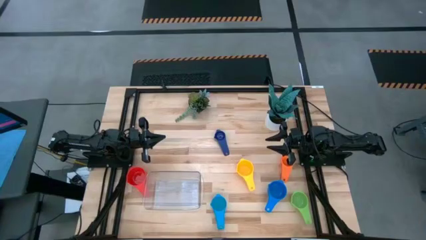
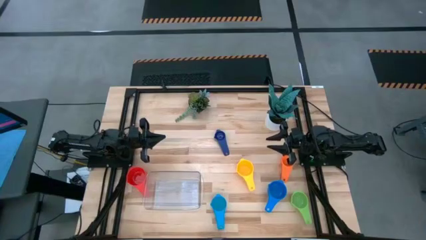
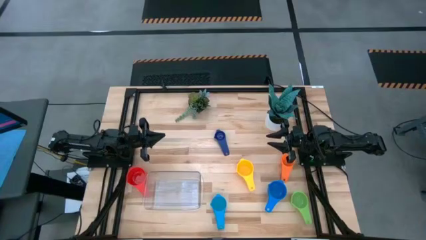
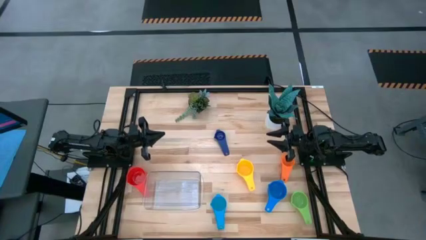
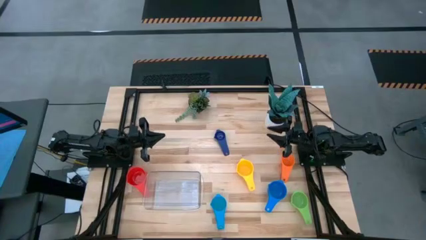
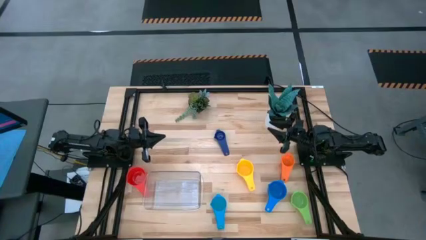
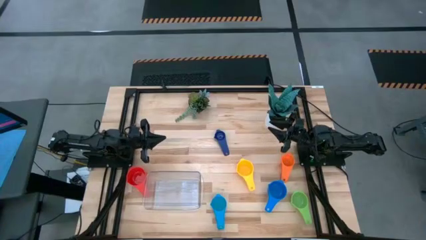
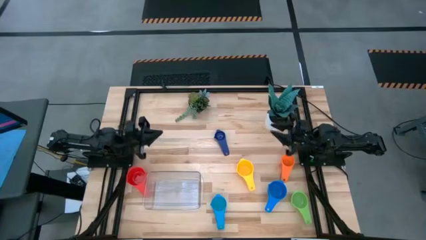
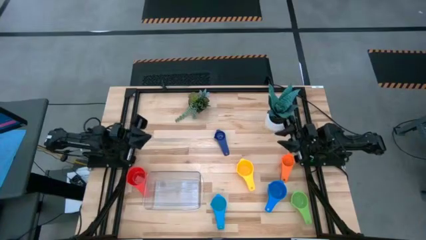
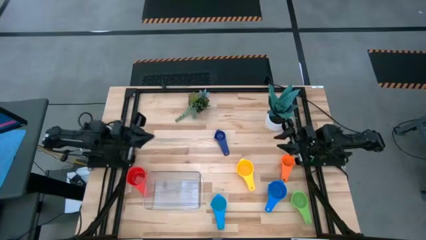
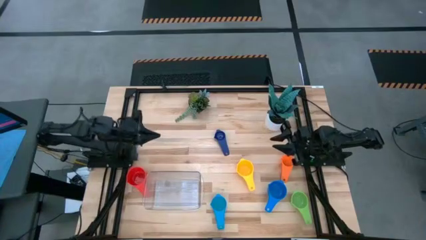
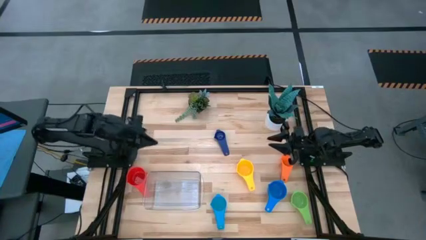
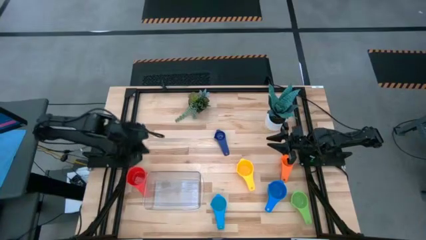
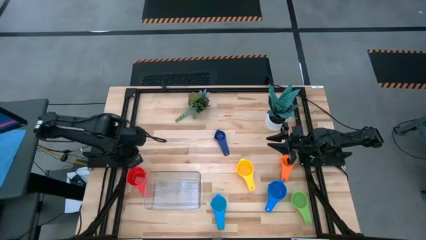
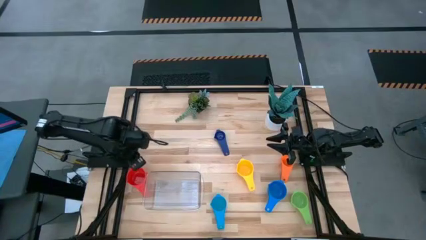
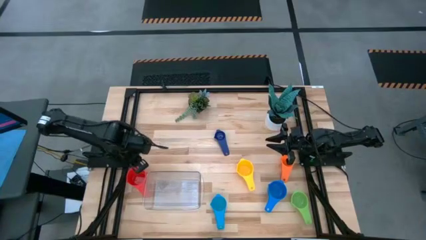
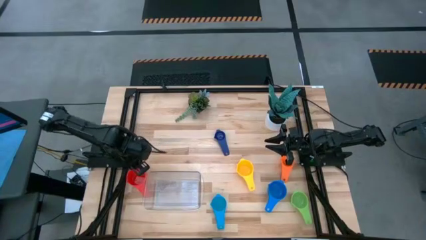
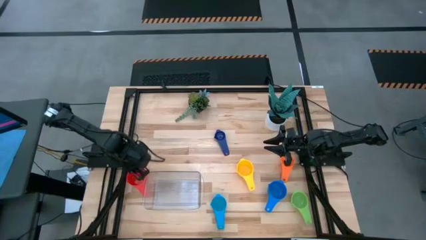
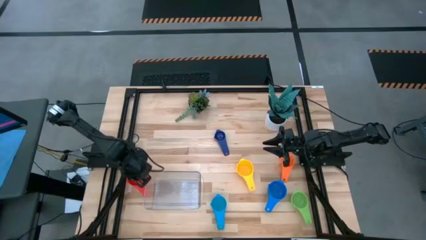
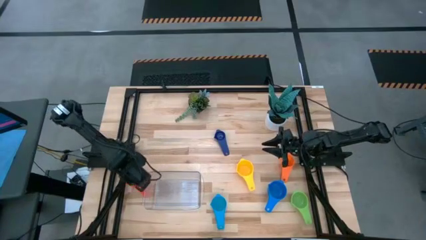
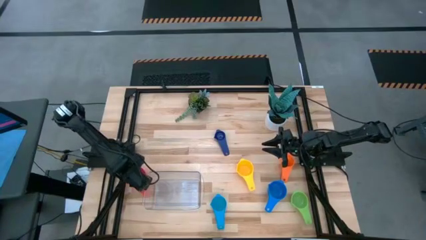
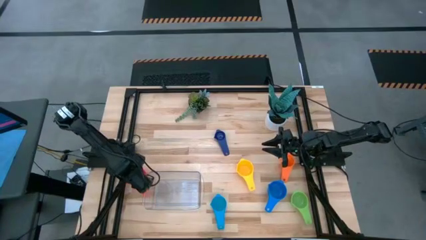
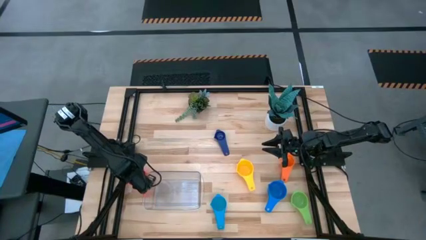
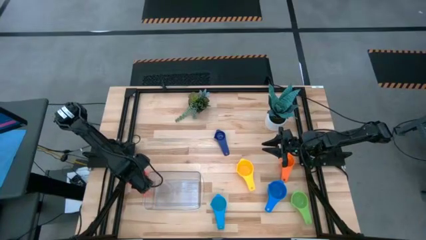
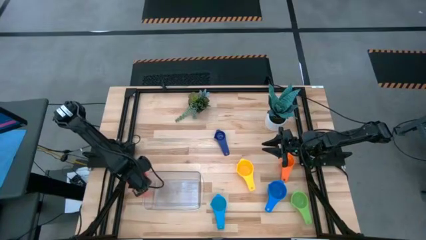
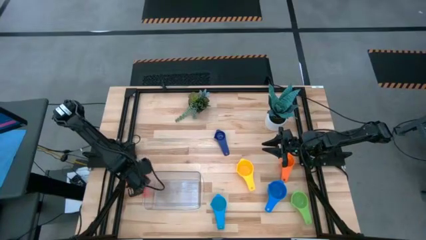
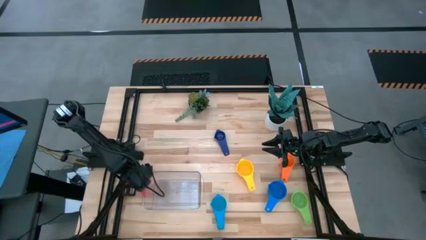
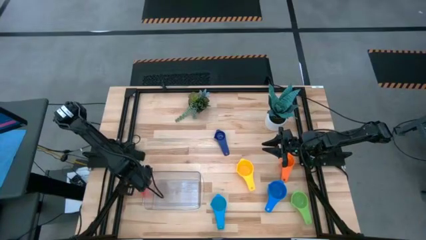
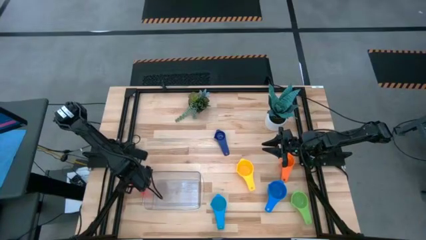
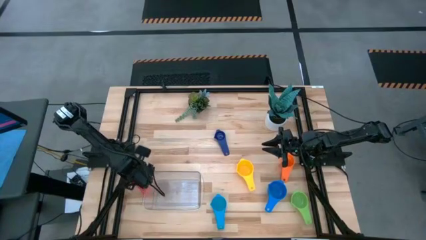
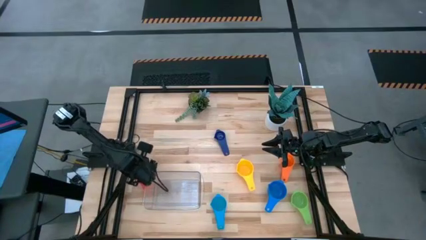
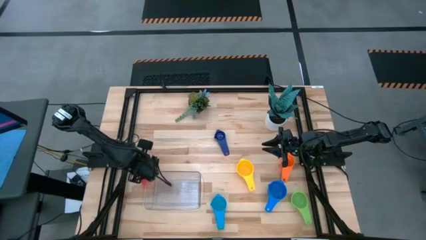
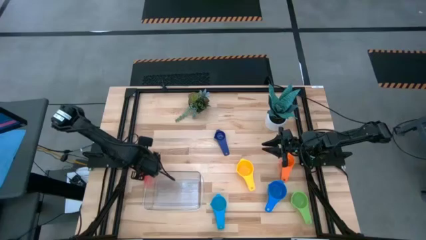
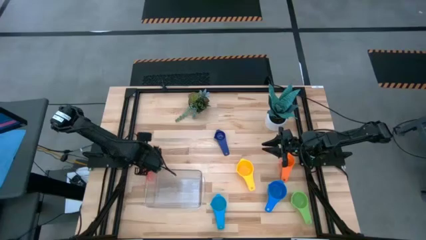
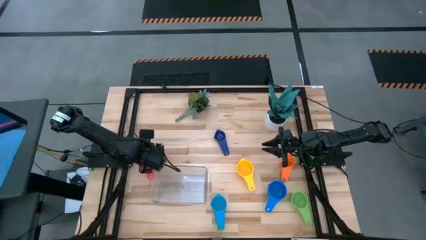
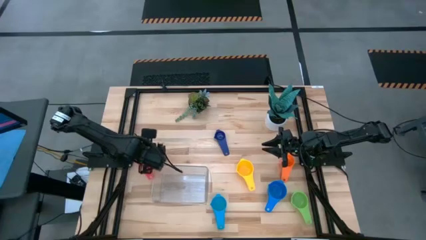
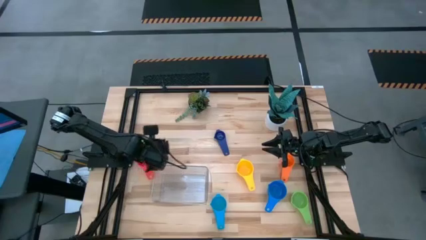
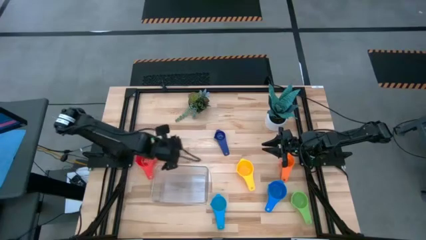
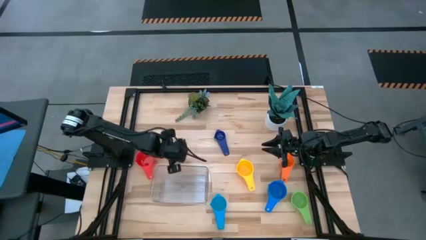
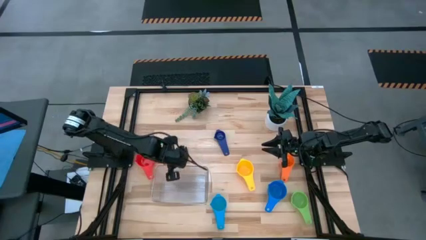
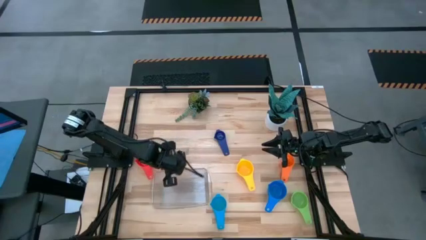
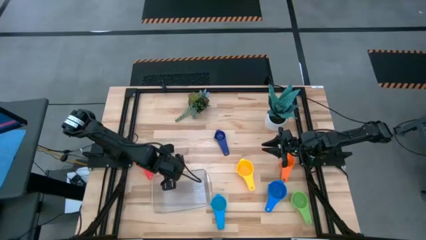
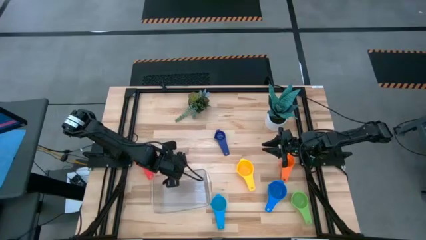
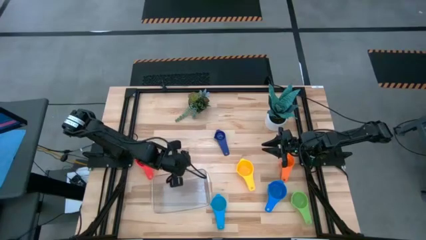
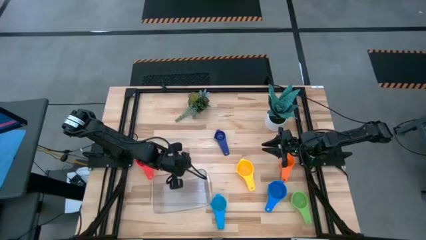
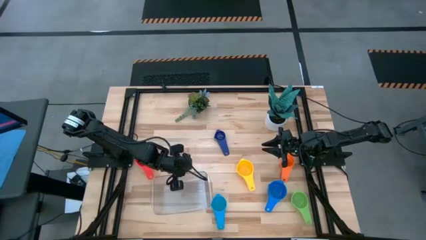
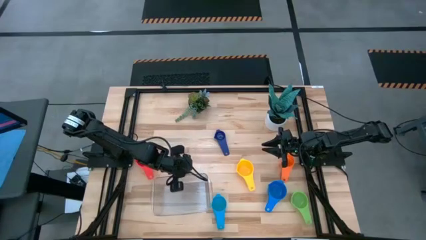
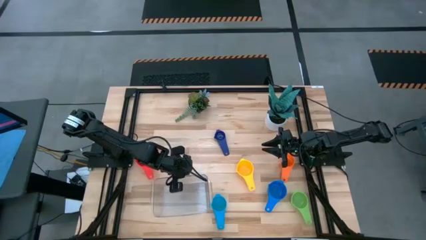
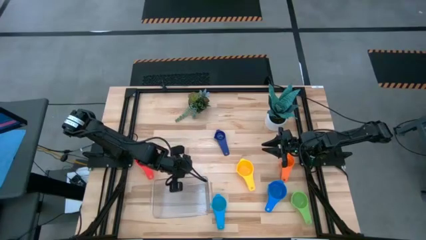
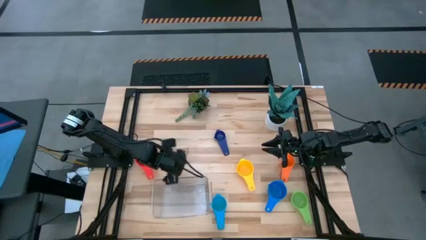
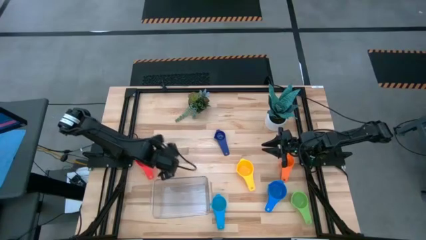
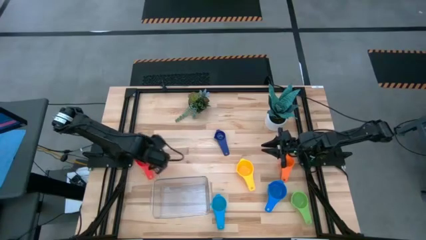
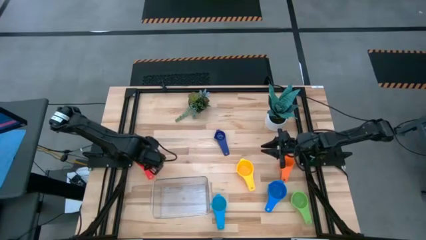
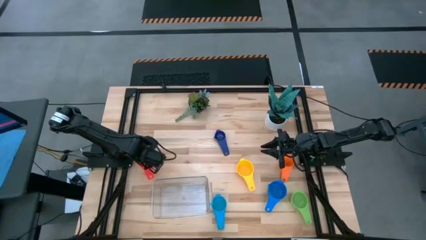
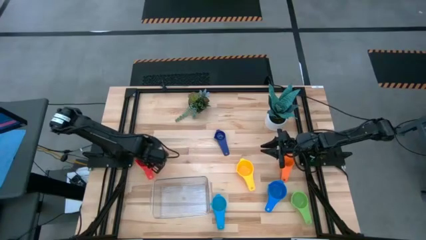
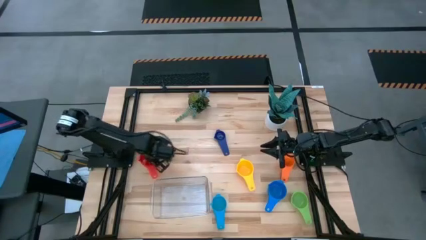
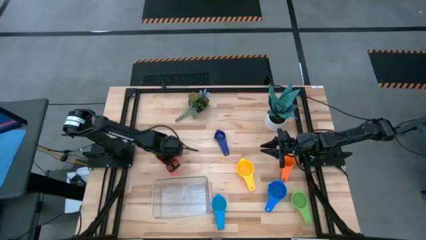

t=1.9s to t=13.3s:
Task: Nest measuring cups in basket
Move the red measuring cup to the center of the table

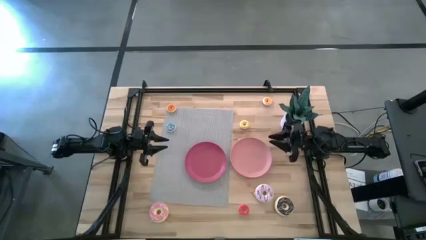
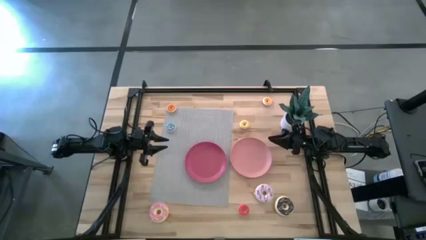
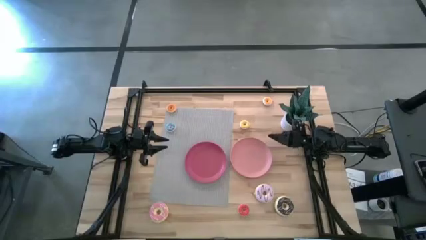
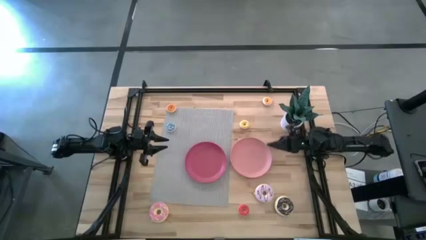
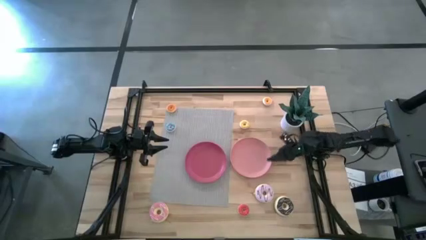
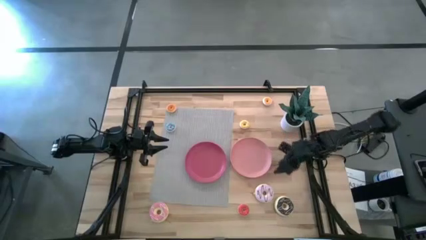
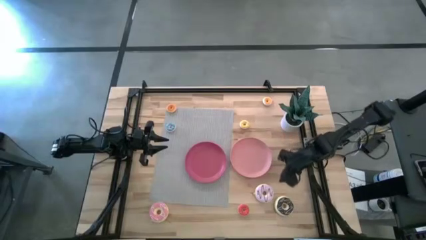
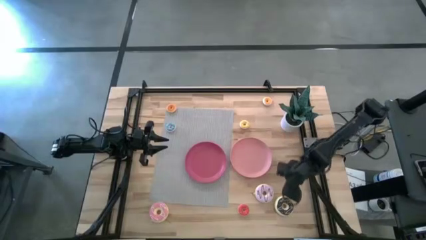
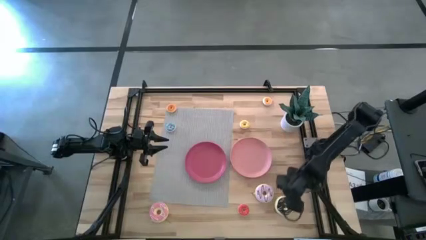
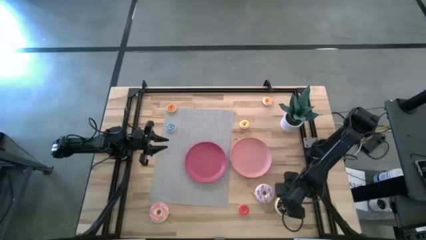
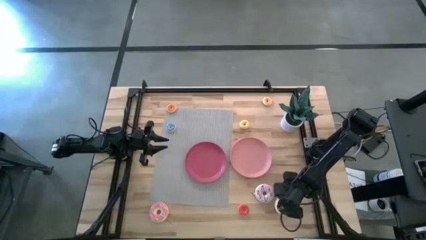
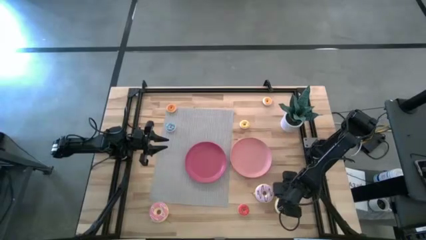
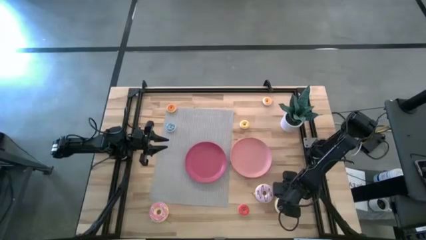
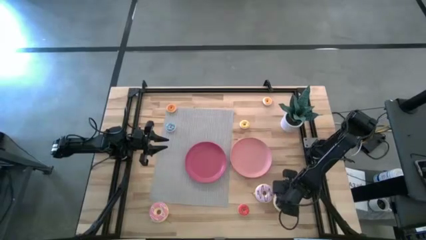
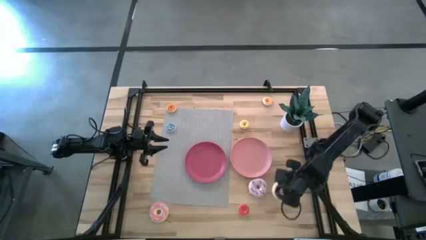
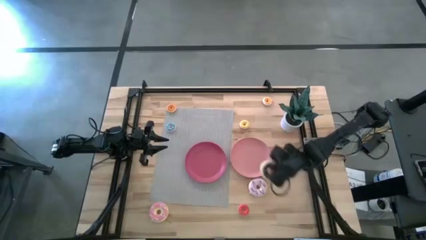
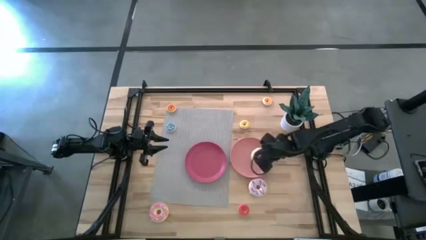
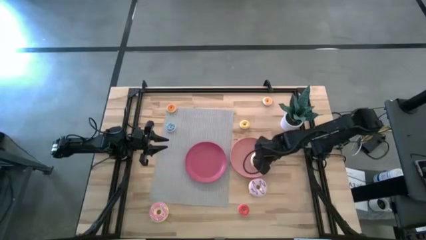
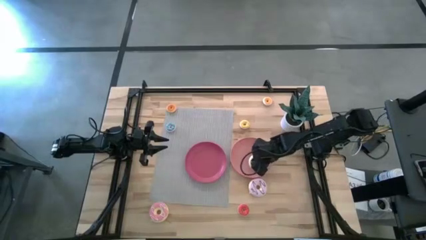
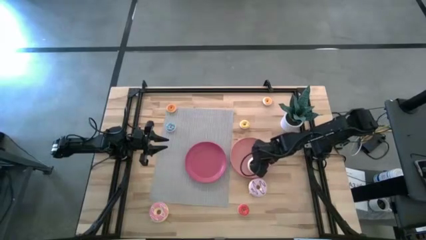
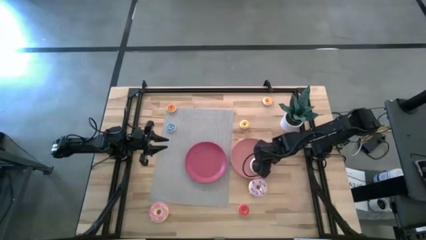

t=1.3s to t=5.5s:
Task: Pick & Place donuts
Put the large black donut on the pink plate
